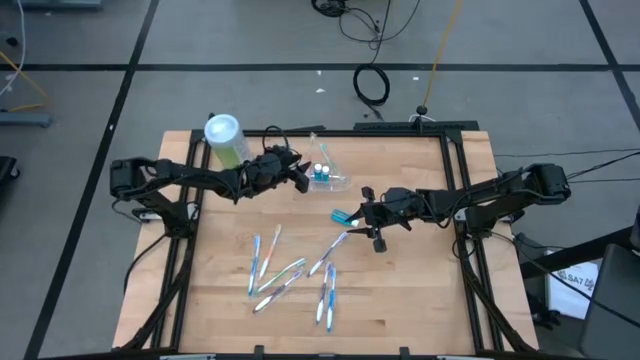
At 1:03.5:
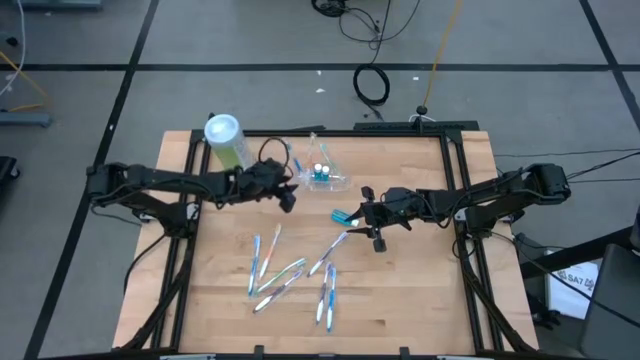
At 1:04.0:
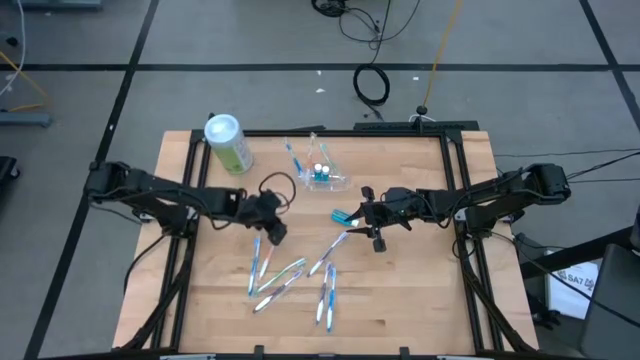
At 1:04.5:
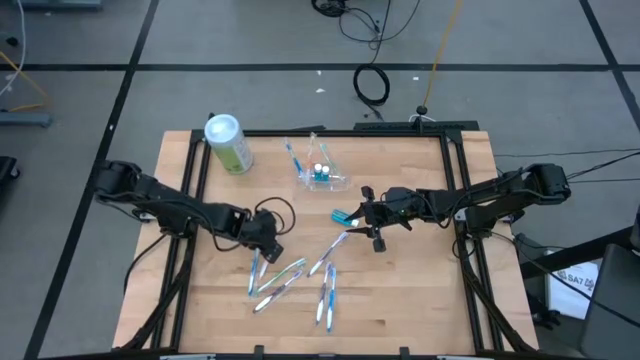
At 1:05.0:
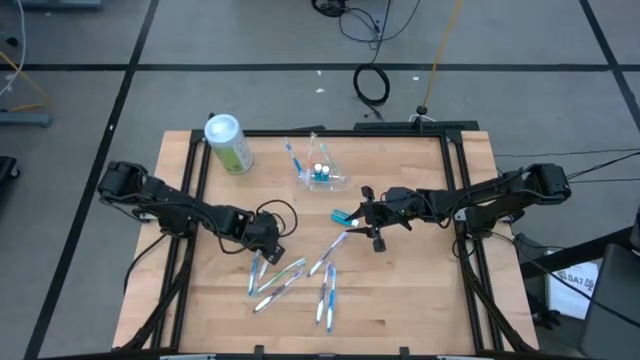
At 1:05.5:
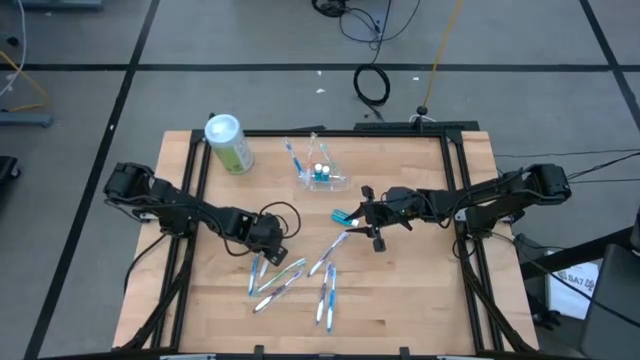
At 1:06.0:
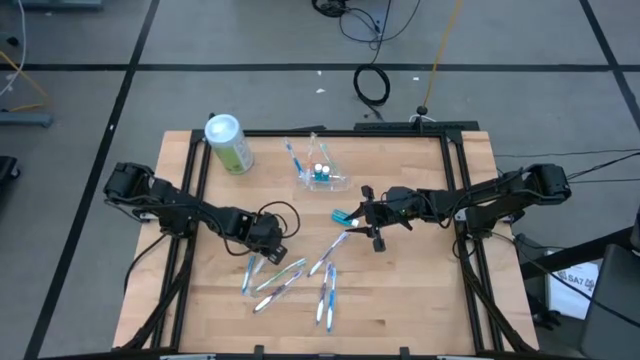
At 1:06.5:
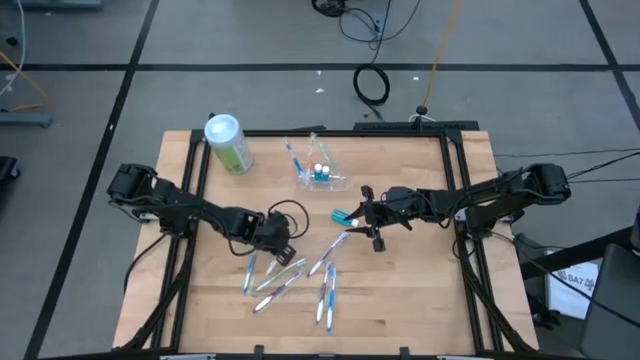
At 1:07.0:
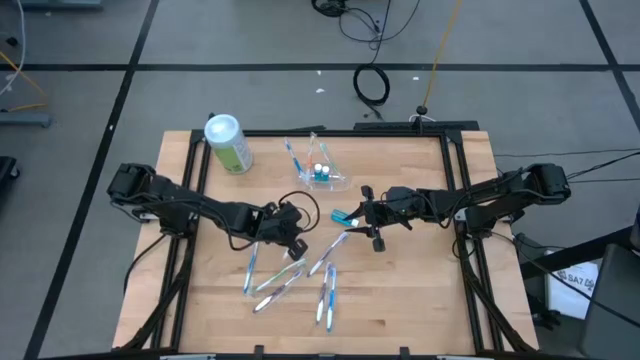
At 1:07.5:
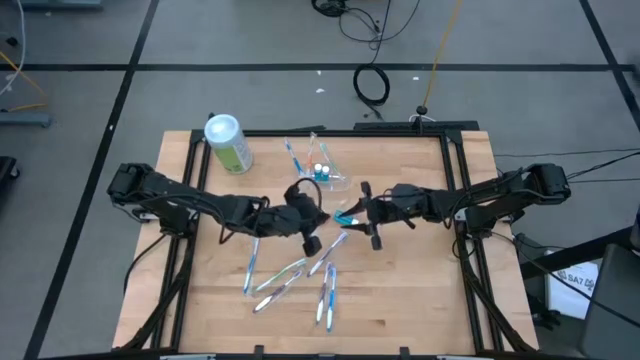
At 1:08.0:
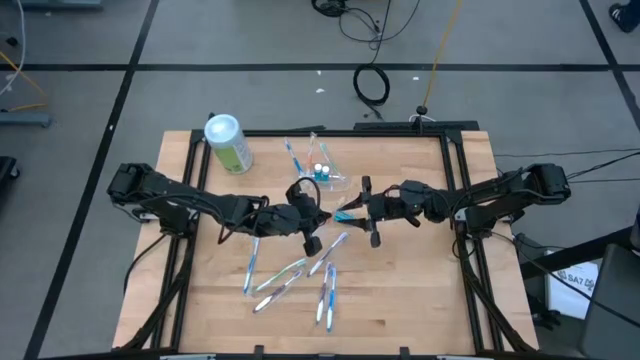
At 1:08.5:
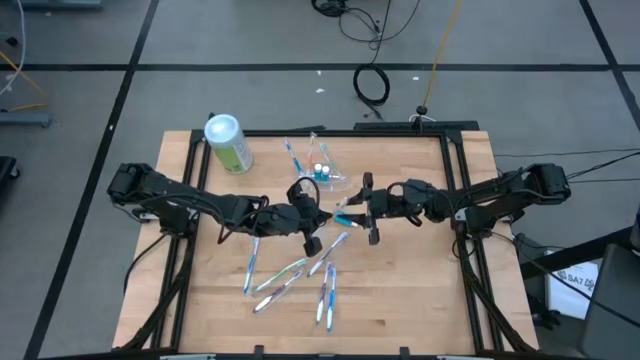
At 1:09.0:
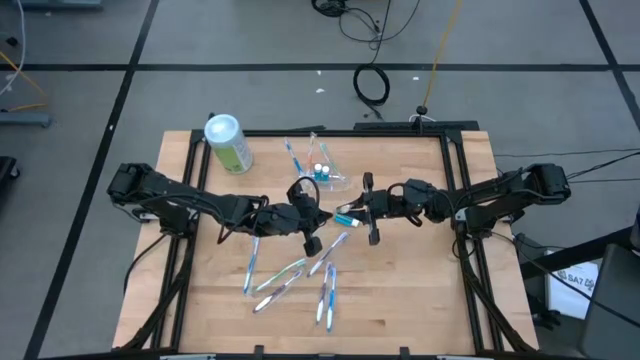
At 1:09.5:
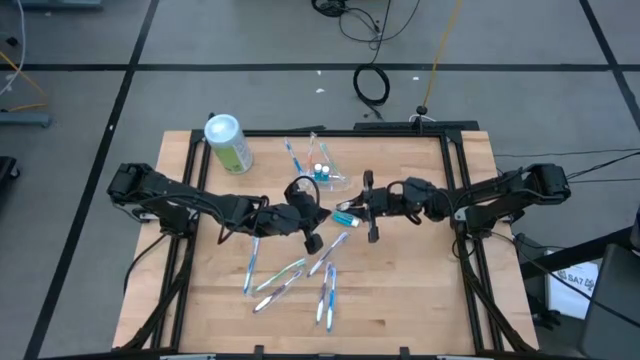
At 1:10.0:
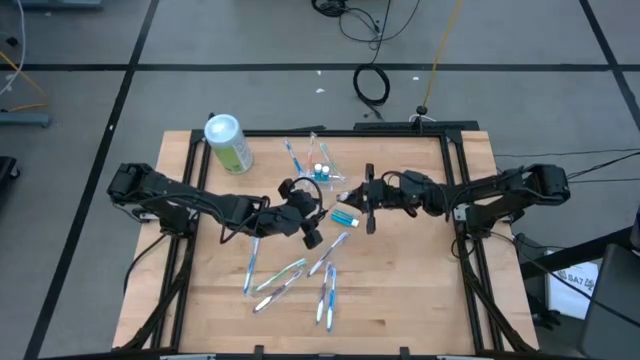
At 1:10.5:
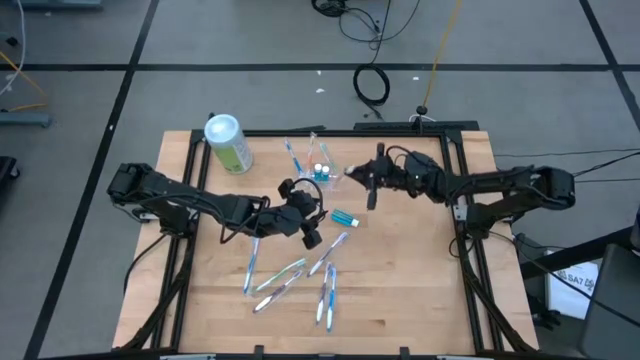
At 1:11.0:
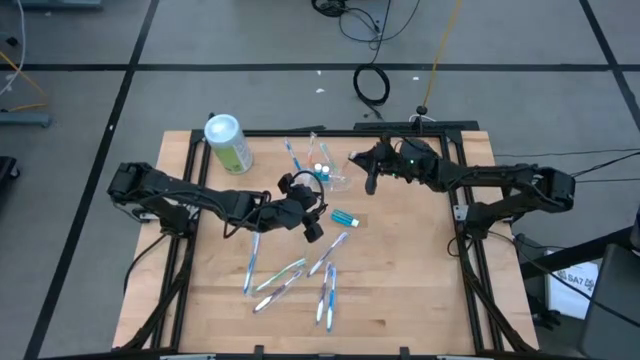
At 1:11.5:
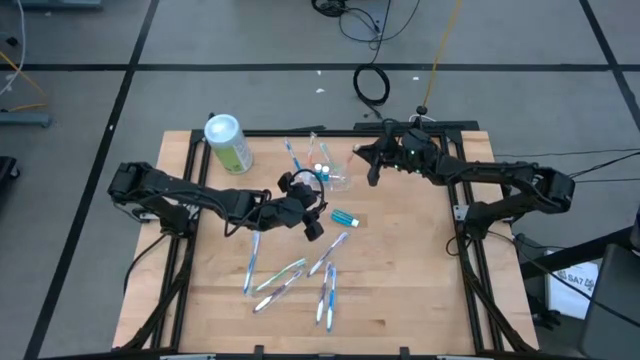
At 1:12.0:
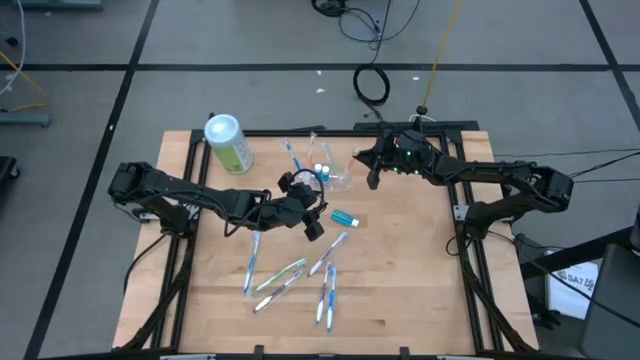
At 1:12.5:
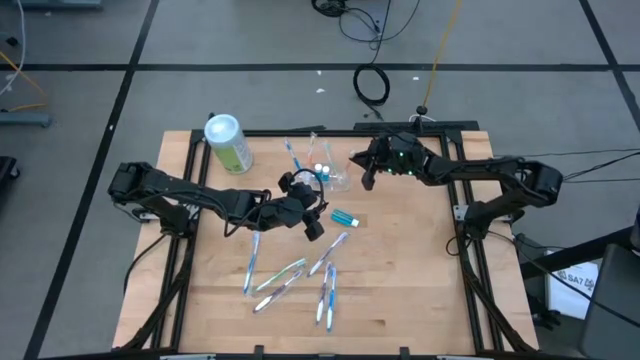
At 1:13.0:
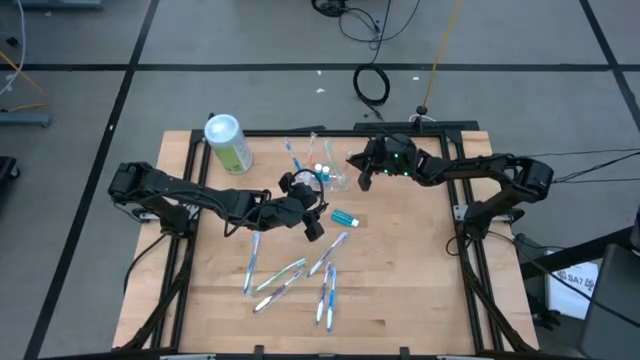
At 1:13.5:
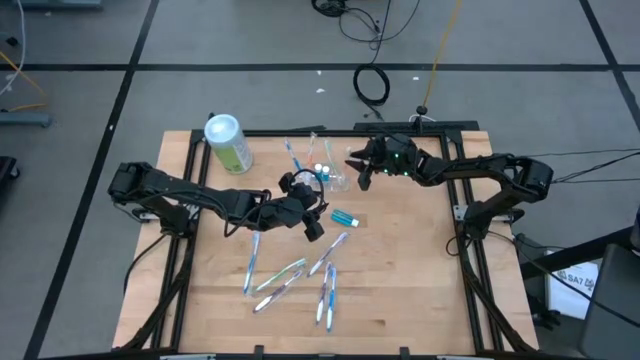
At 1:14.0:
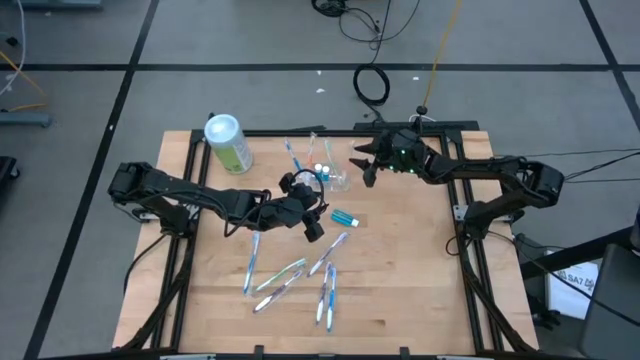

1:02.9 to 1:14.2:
Task: Pick & Place toothbrushing station
Put the orange toothbrush into the transparent organizer

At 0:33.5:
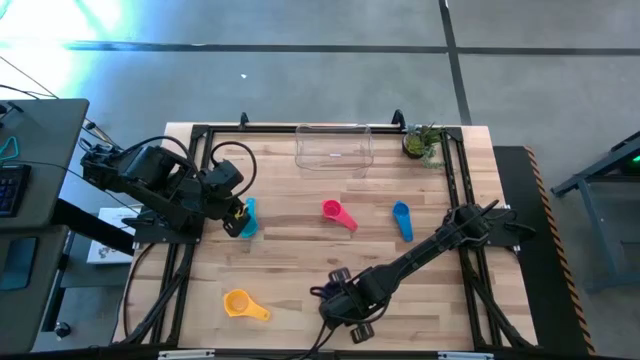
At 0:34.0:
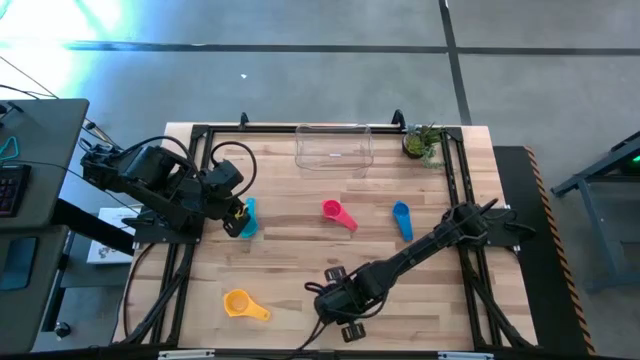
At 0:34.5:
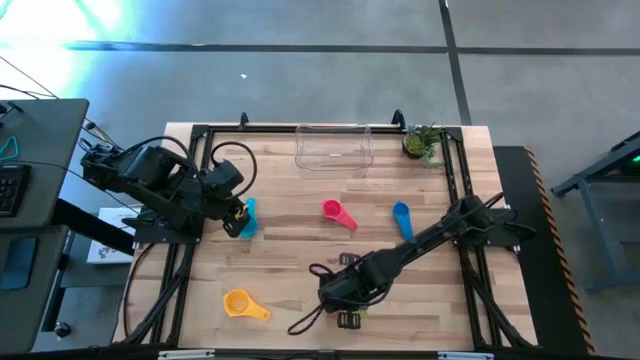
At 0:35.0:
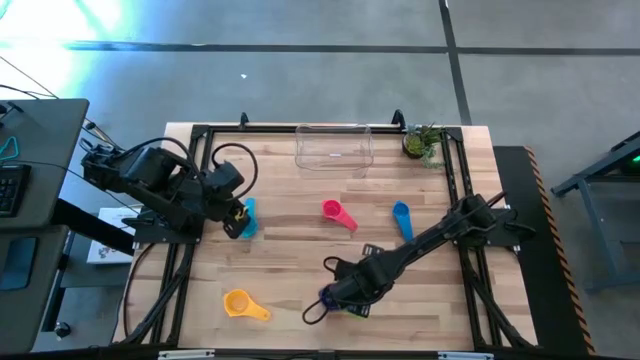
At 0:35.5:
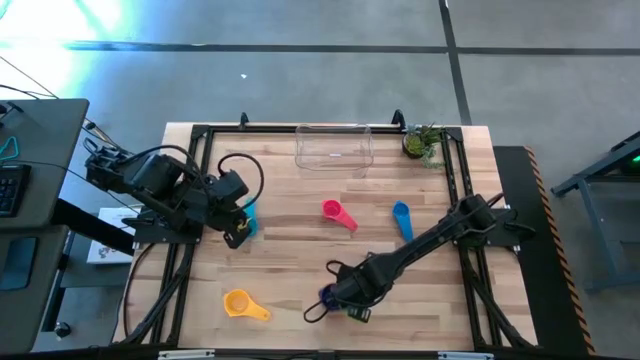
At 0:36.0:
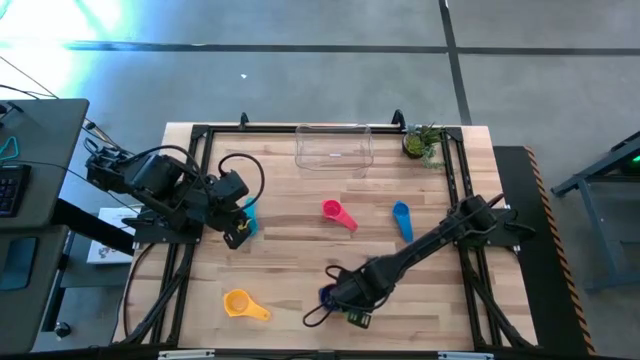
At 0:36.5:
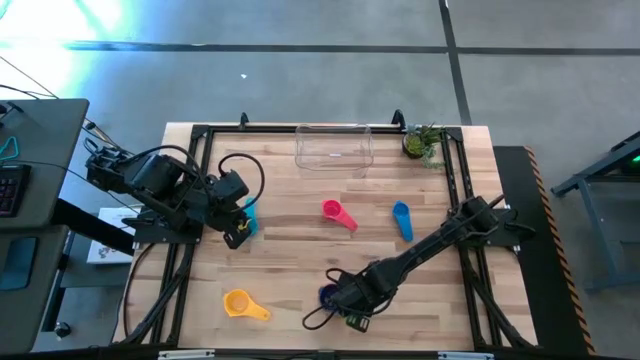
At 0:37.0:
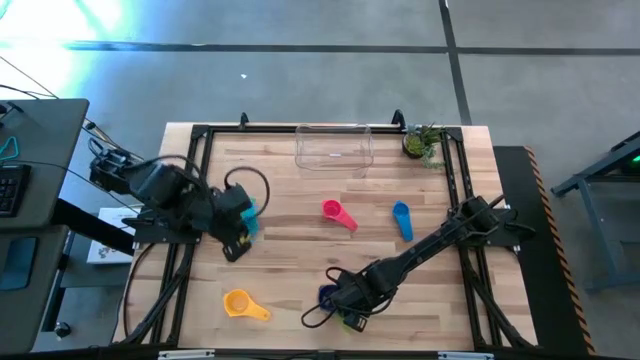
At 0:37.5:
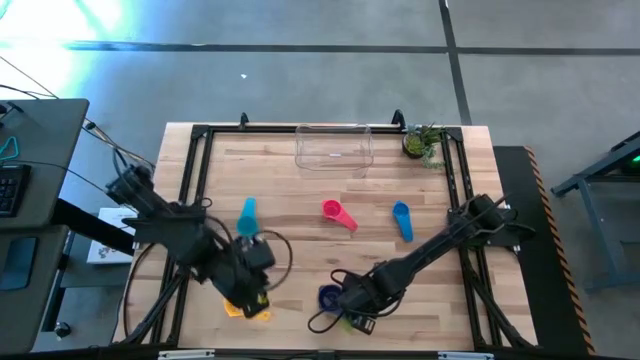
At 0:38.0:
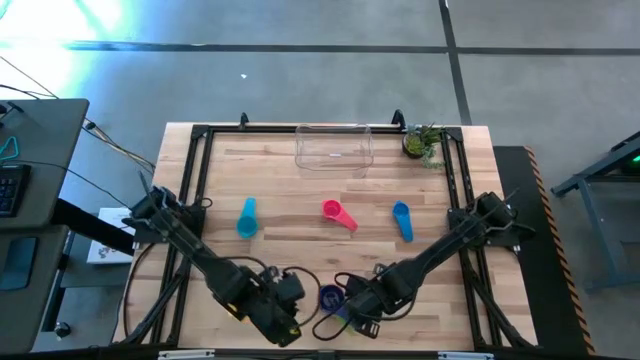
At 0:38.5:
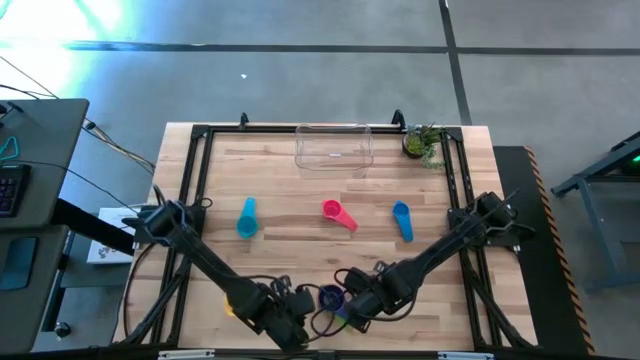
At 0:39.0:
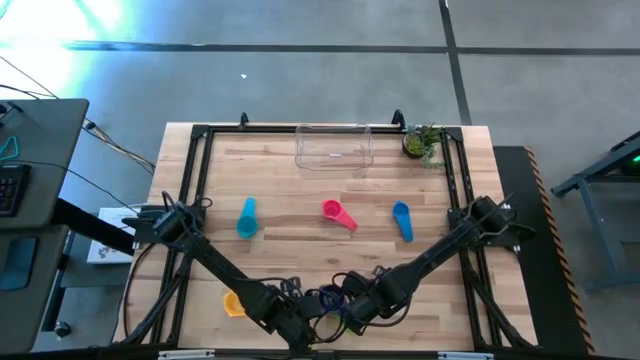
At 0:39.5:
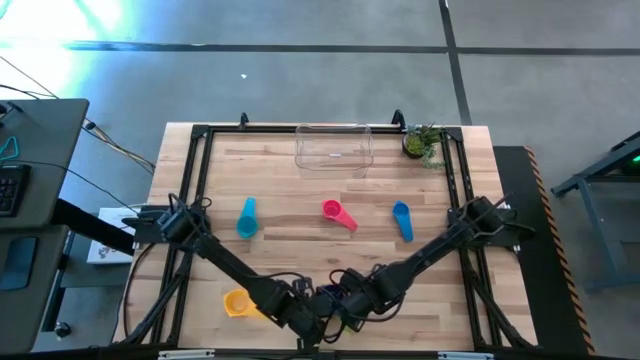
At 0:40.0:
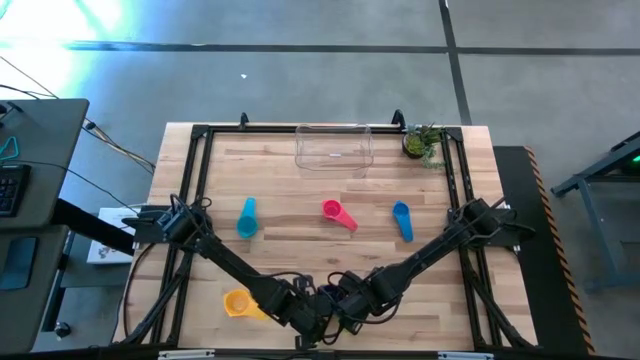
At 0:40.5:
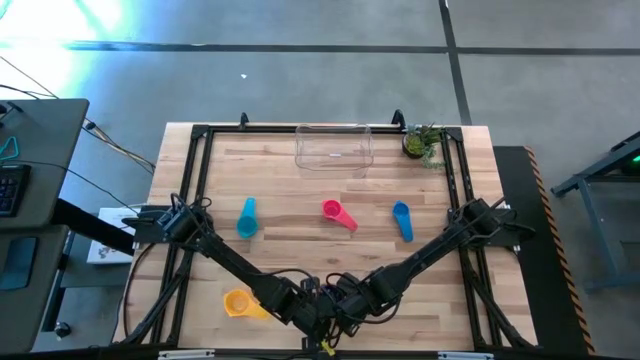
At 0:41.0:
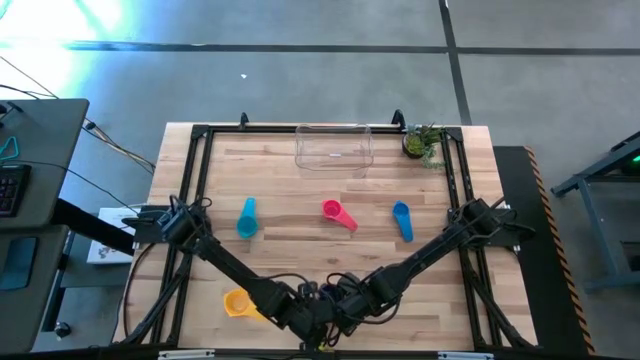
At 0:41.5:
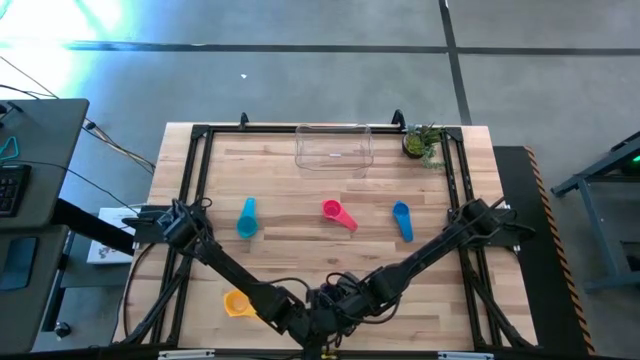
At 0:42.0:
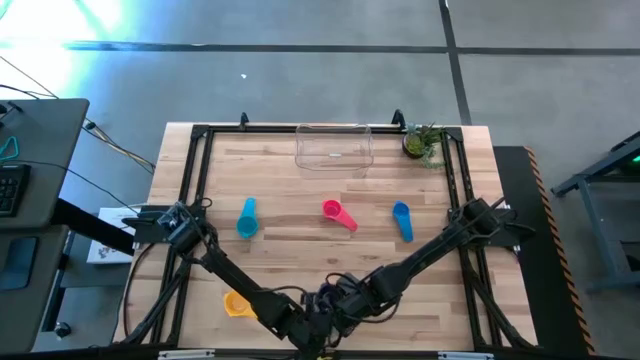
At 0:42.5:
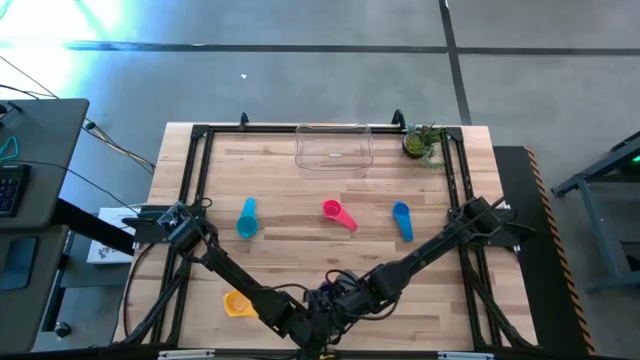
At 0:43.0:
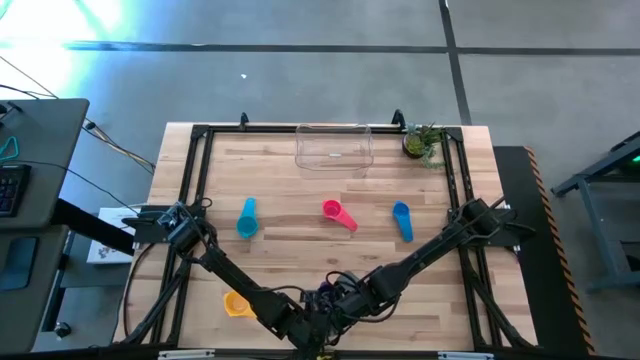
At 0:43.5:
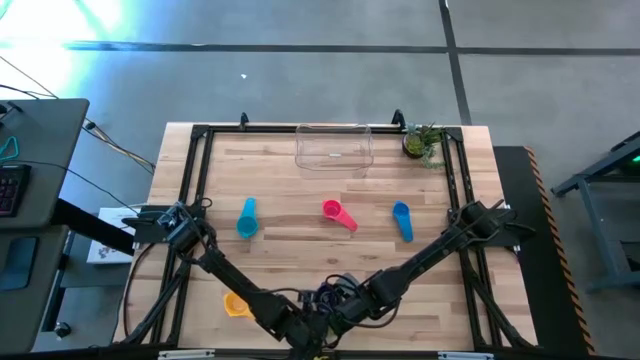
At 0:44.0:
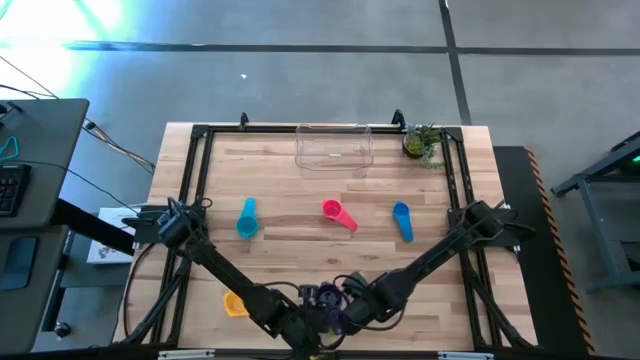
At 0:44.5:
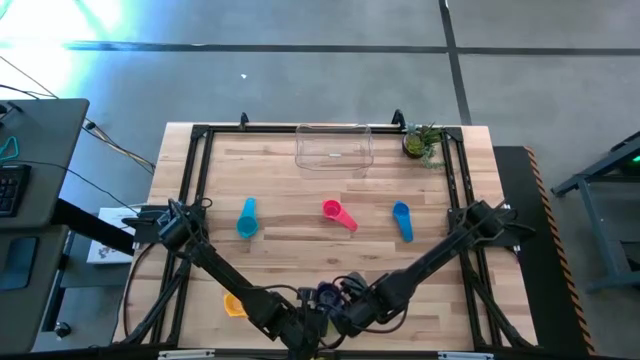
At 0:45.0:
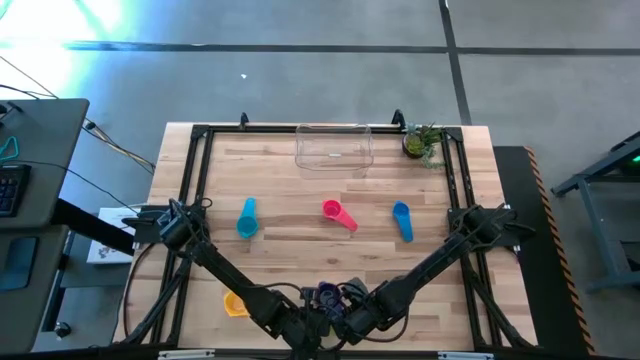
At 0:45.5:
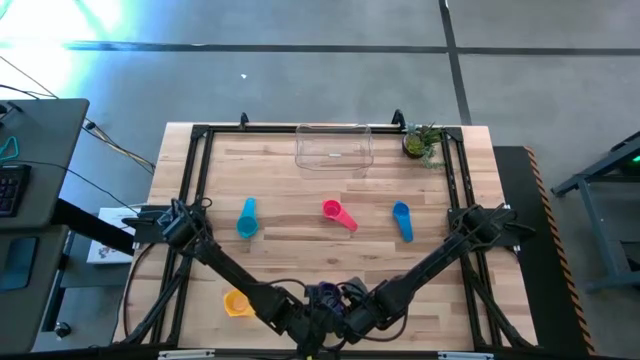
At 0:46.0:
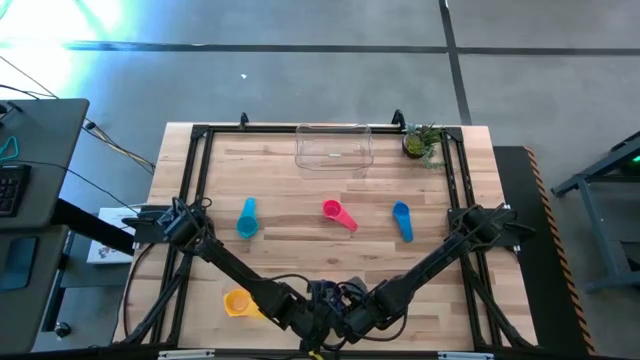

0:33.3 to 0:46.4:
Task: Nest measuring cups in basket
Stack the dark blue measuring cup on the green measuring cup
